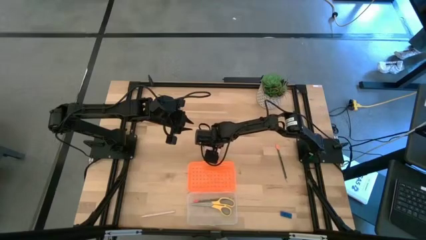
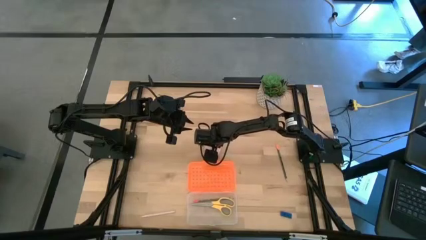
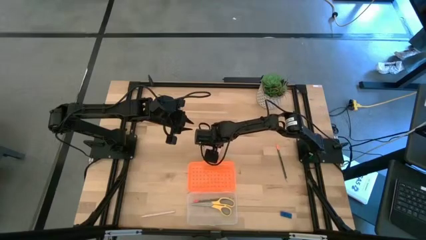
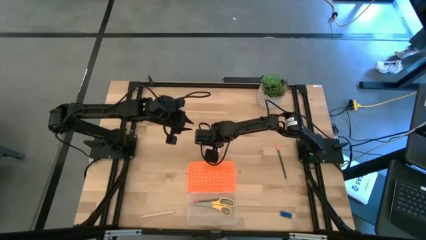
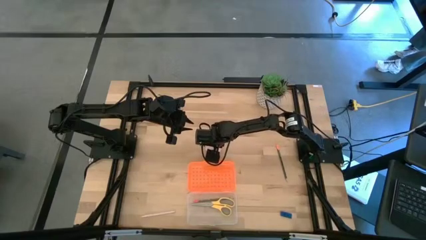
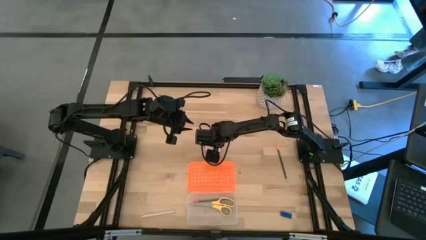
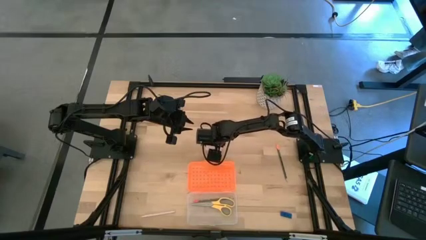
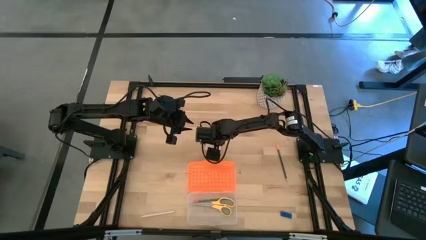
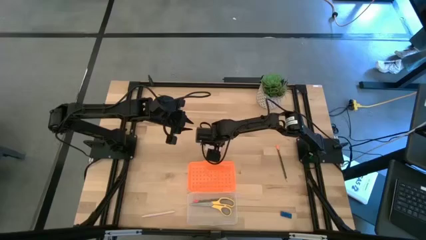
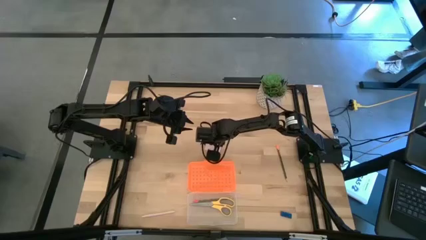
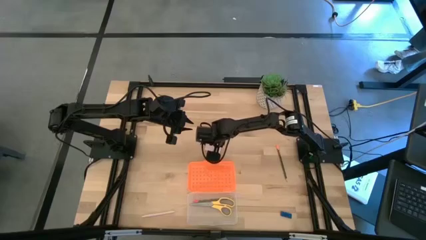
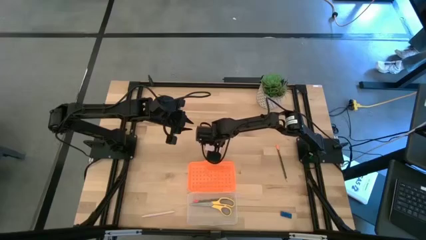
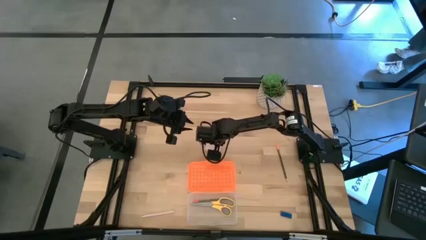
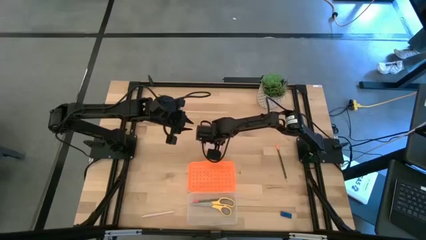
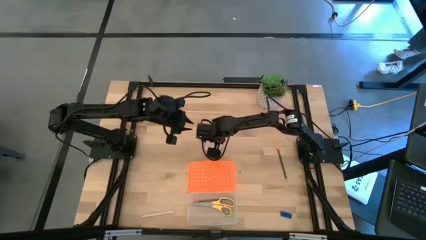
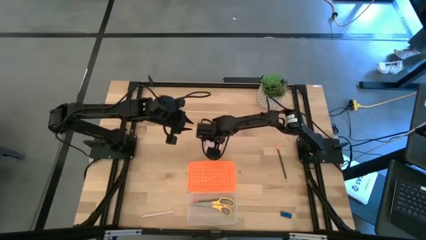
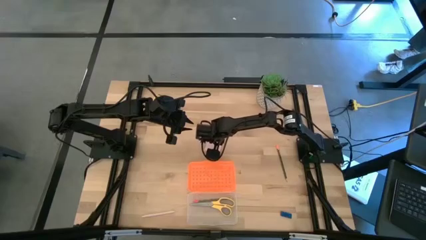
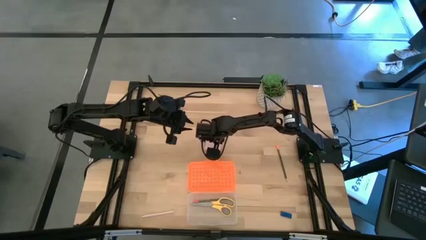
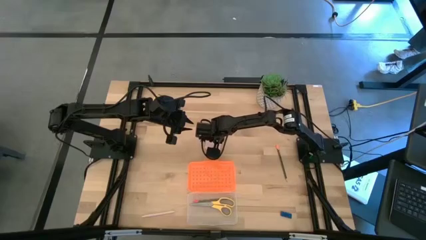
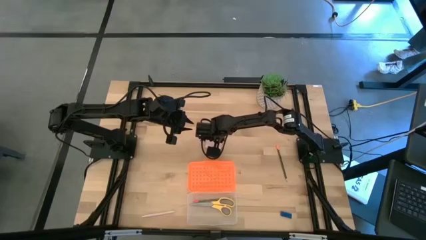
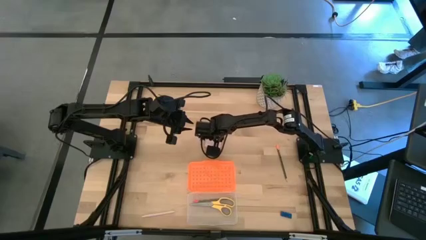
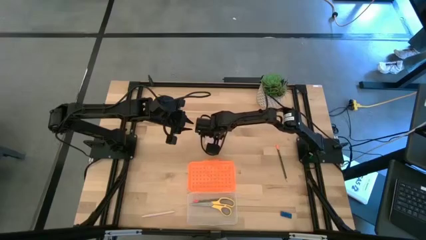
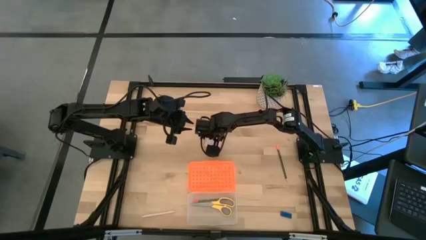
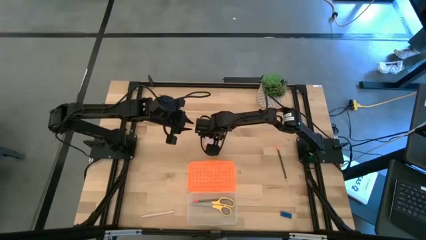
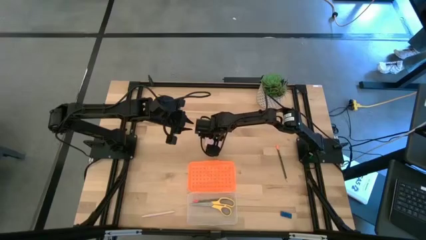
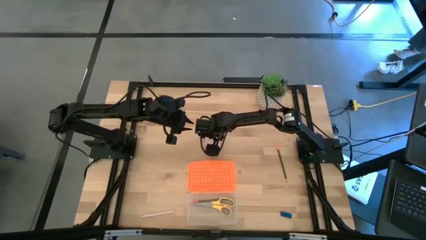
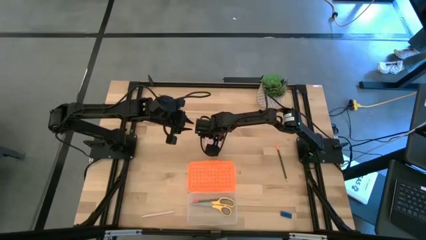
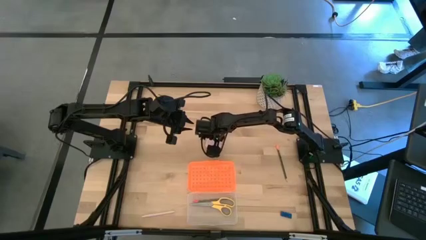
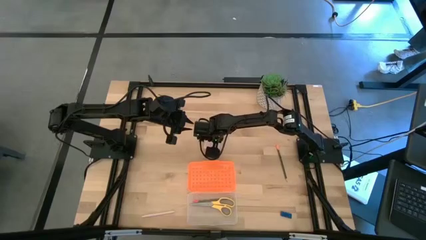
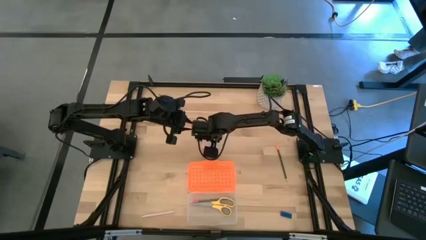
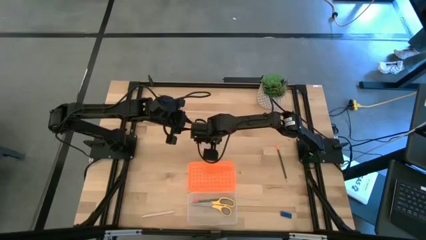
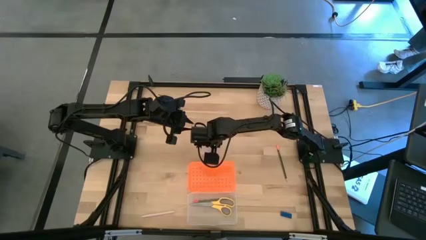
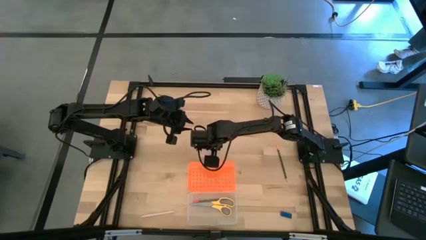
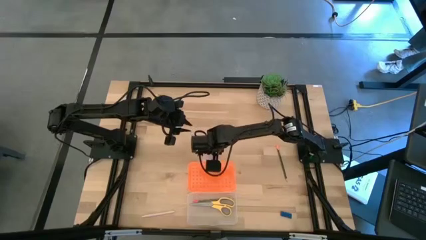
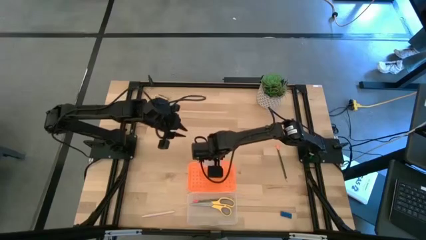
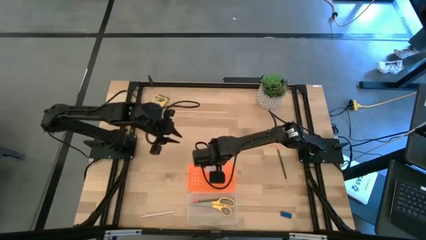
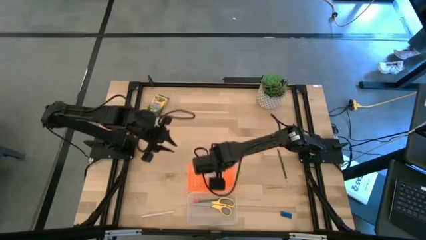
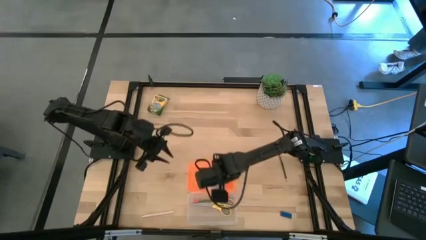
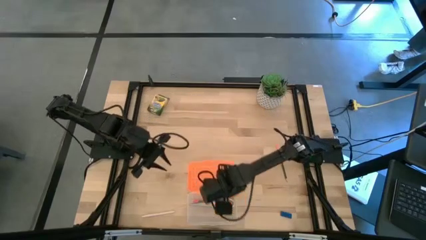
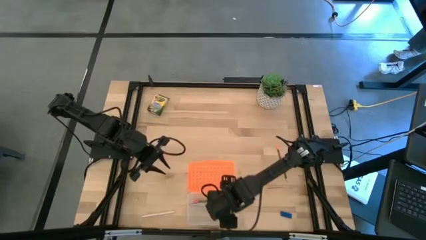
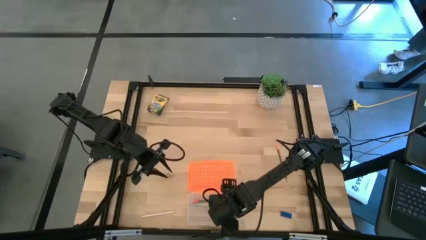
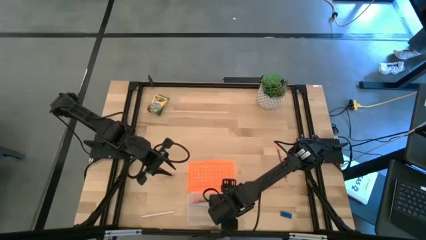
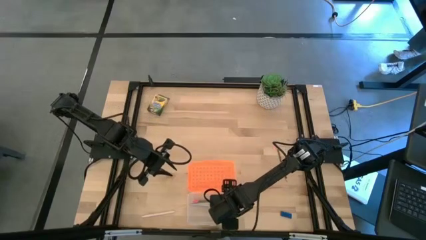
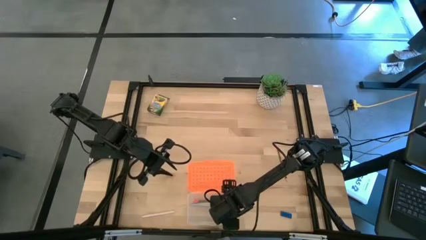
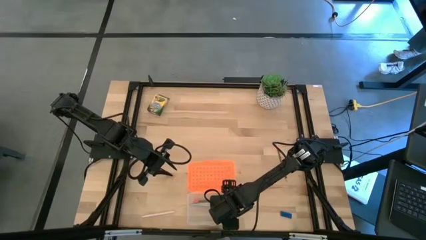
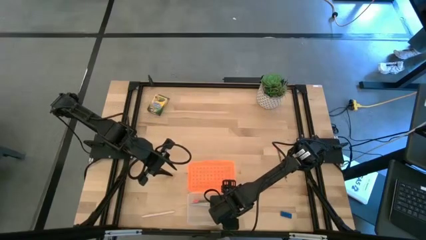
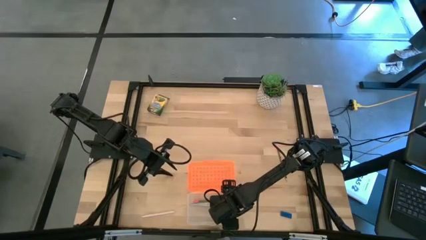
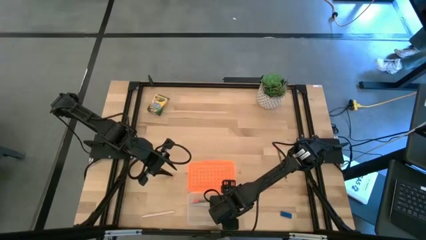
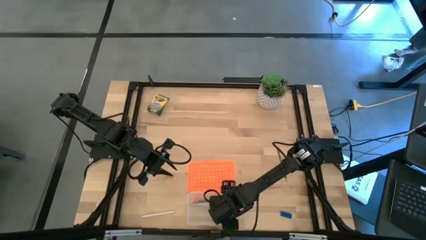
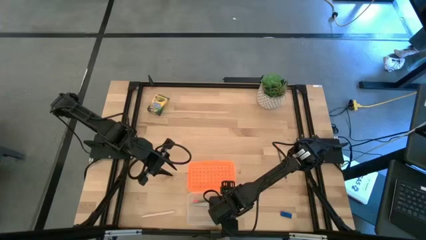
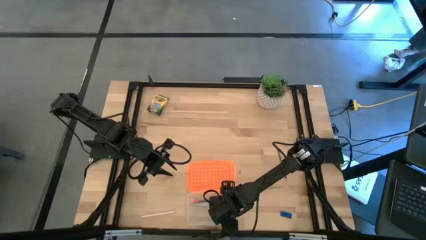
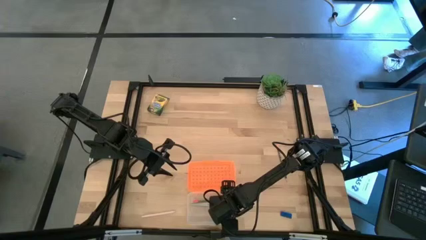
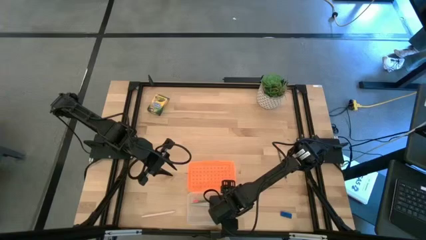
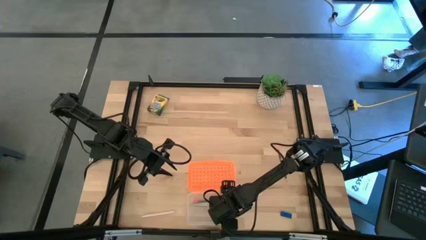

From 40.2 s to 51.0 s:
Task: Pack school essentials
Put the notepad into the supply box

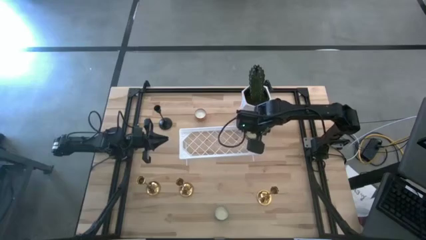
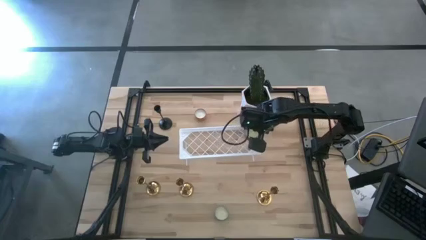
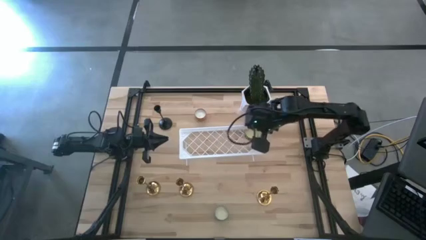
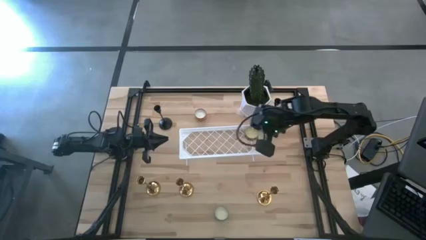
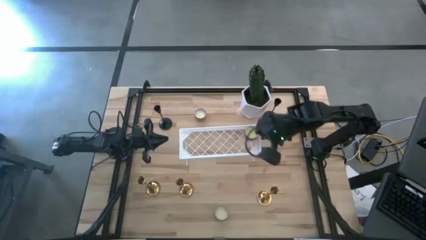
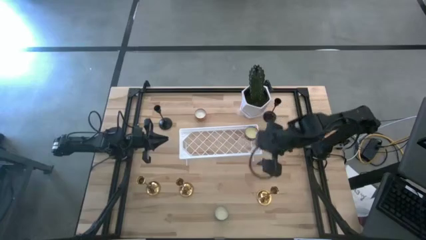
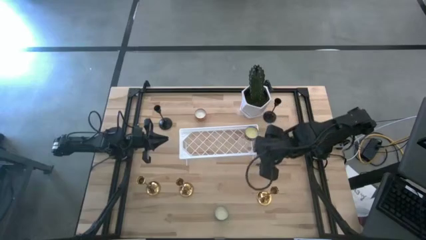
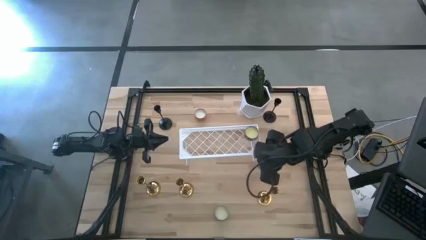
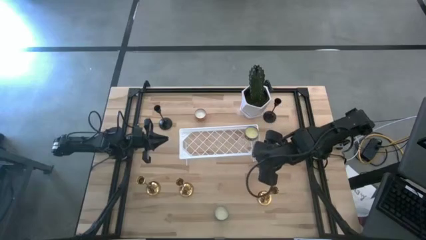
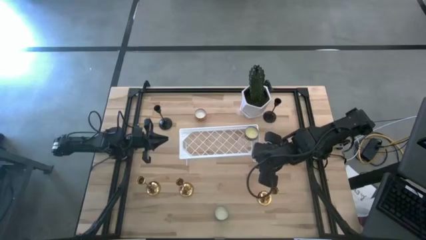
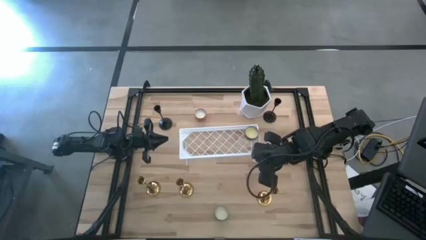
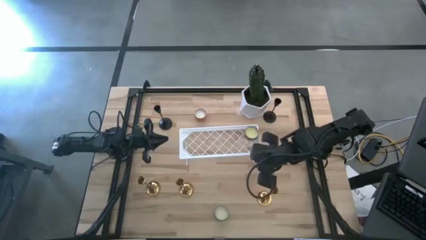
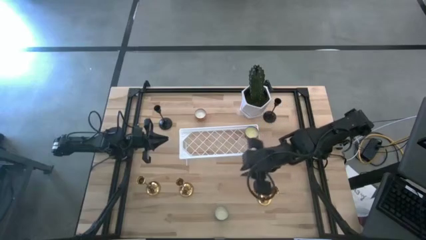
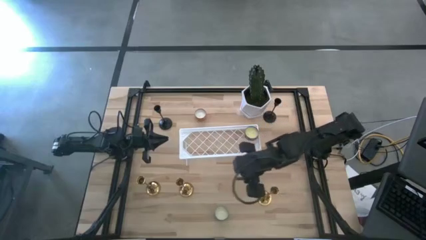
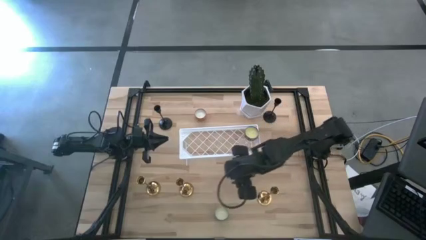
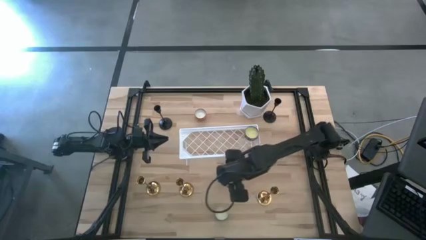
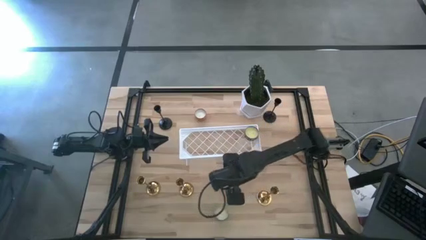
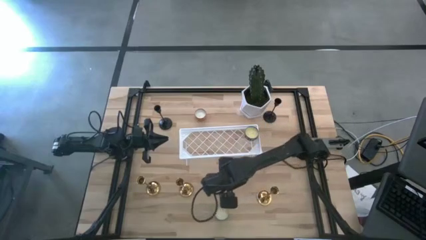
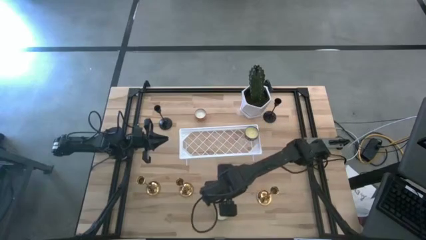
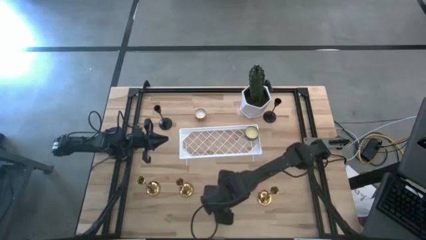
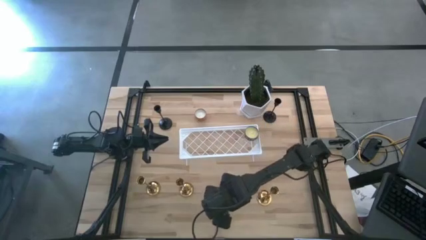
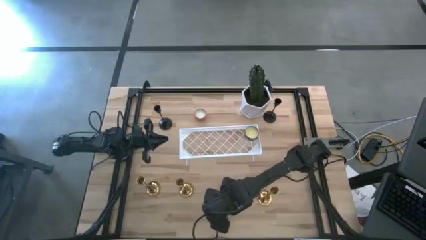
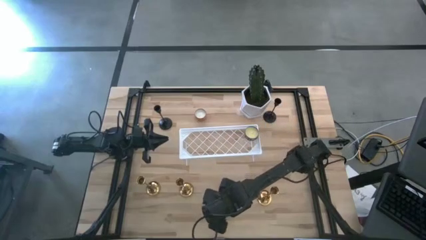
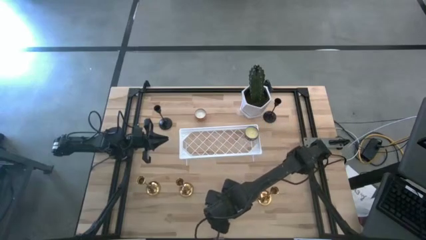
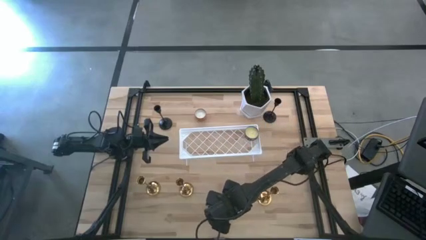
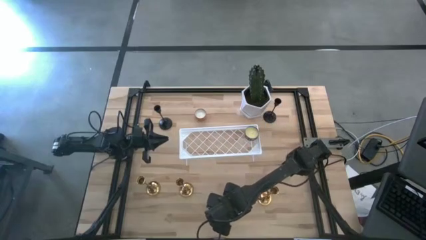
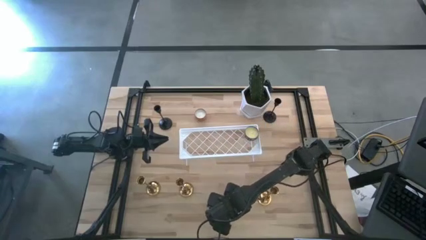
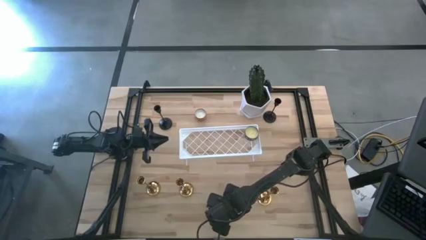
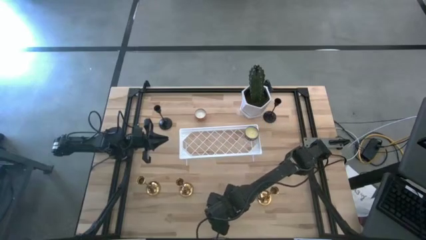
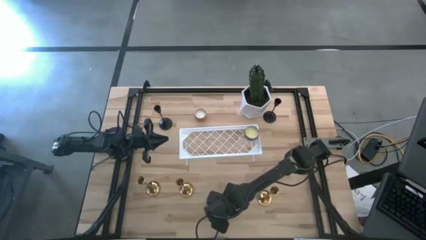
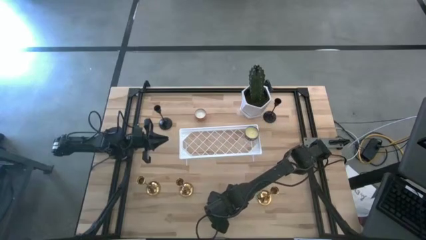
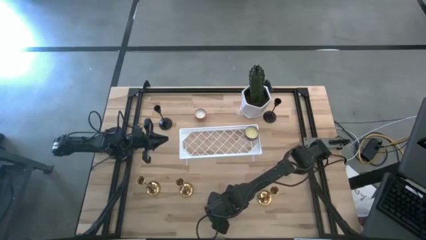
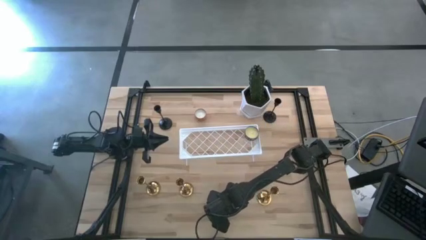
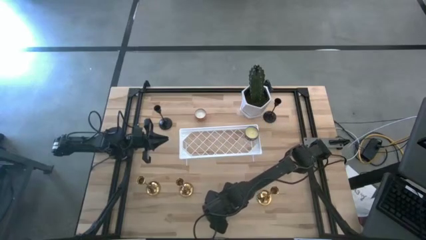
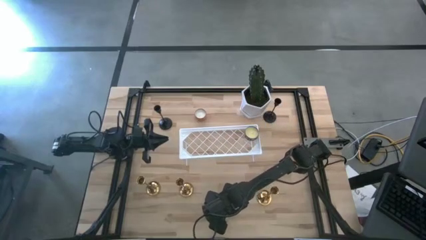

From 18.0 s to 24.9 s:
Task: Pick & Place candle stick holders
Put the blue scented candle on the shelf
